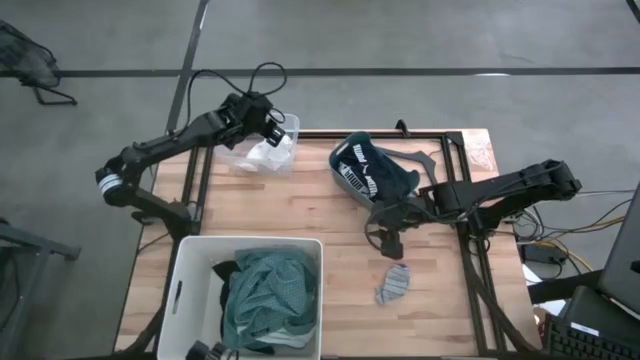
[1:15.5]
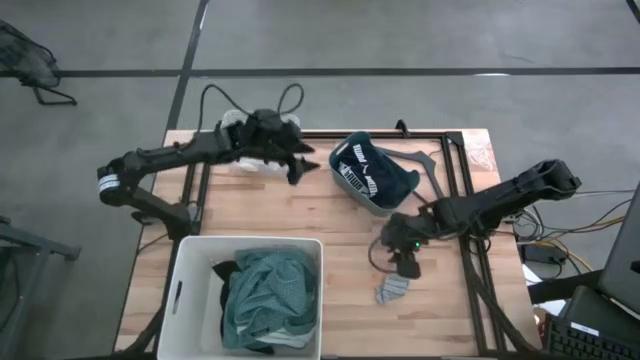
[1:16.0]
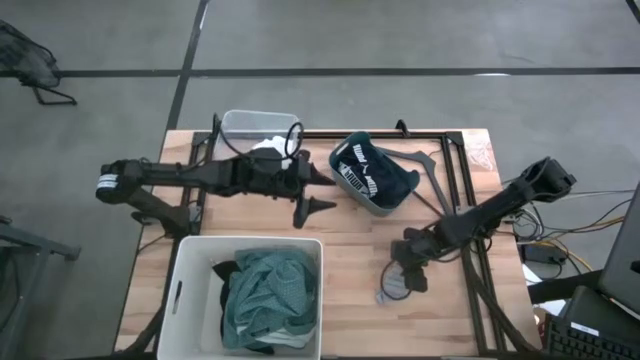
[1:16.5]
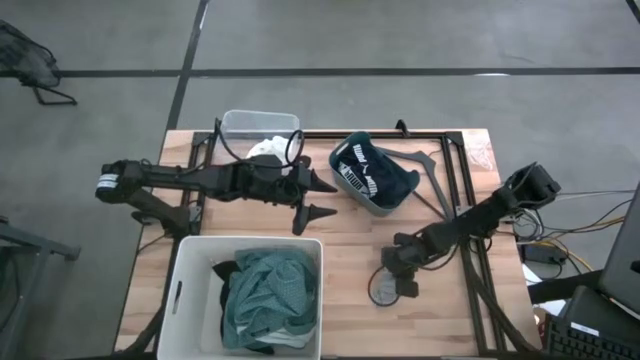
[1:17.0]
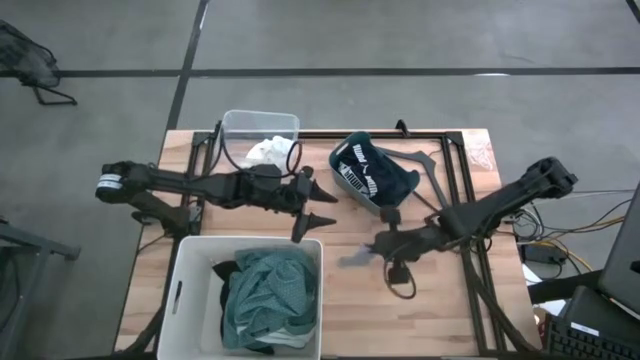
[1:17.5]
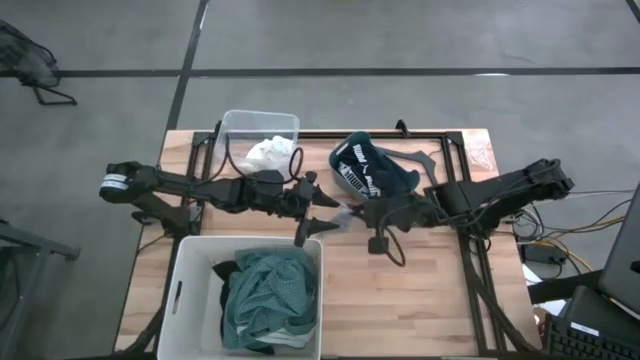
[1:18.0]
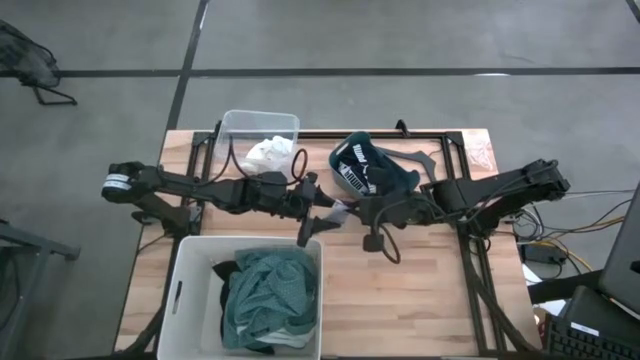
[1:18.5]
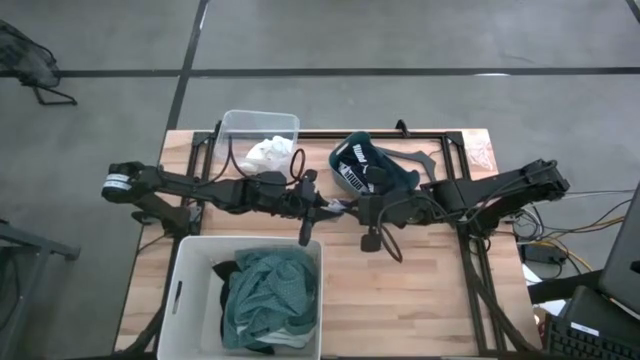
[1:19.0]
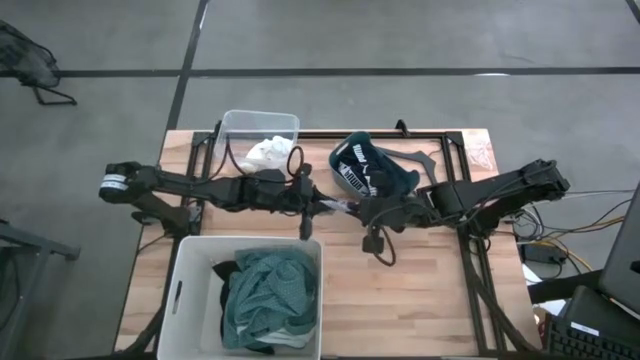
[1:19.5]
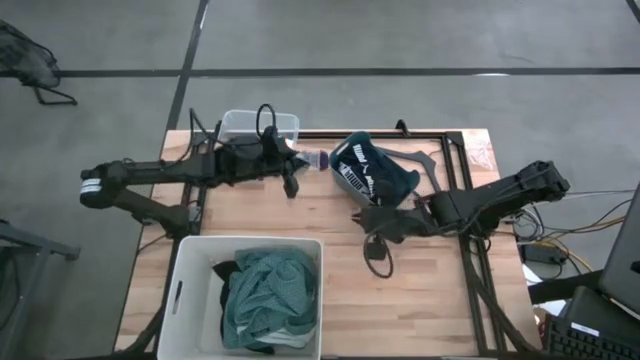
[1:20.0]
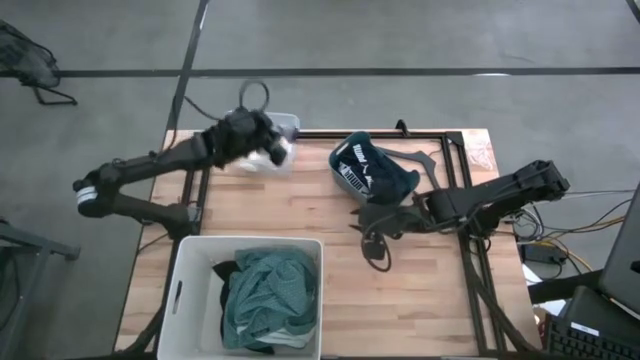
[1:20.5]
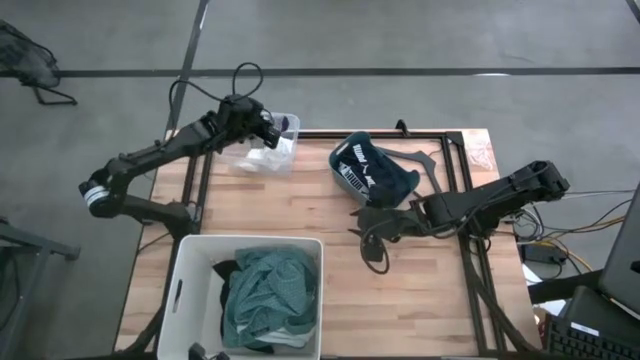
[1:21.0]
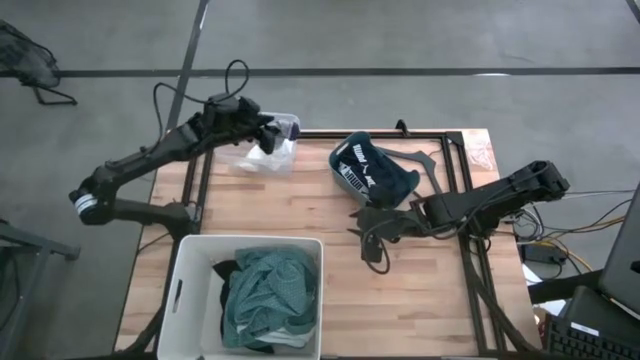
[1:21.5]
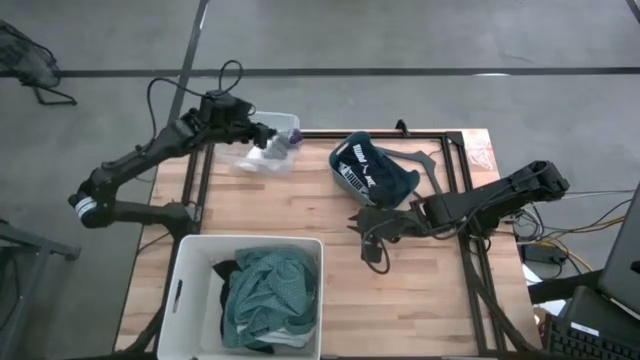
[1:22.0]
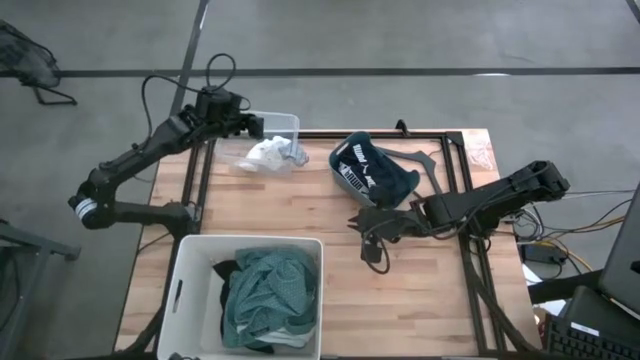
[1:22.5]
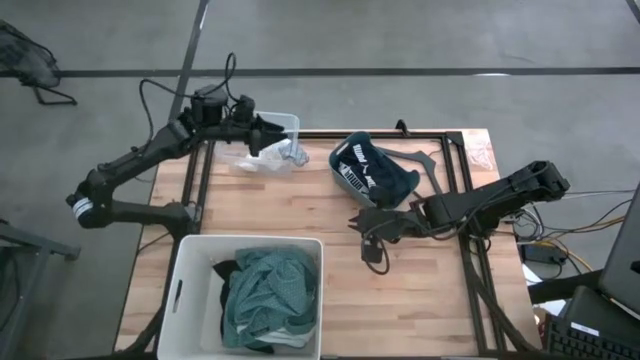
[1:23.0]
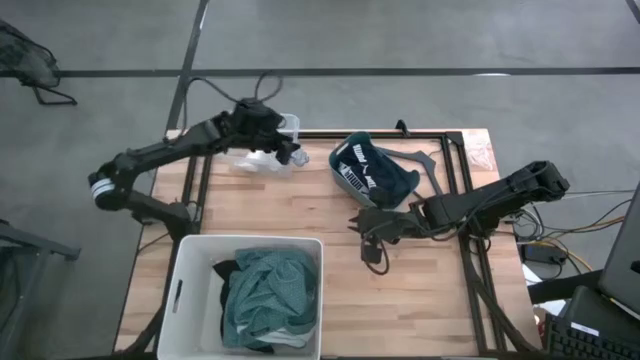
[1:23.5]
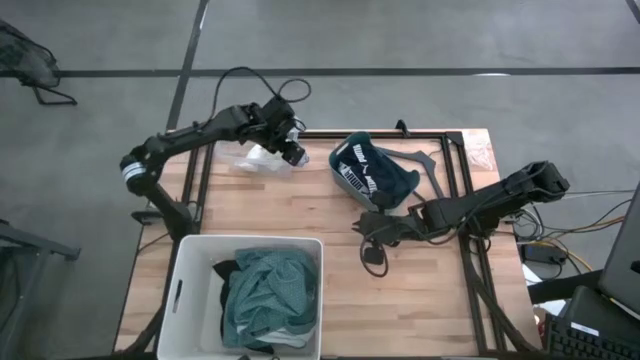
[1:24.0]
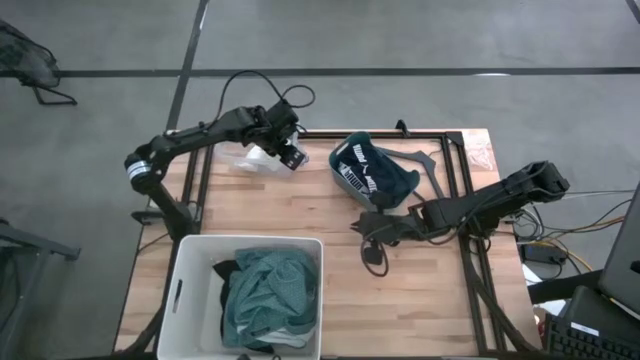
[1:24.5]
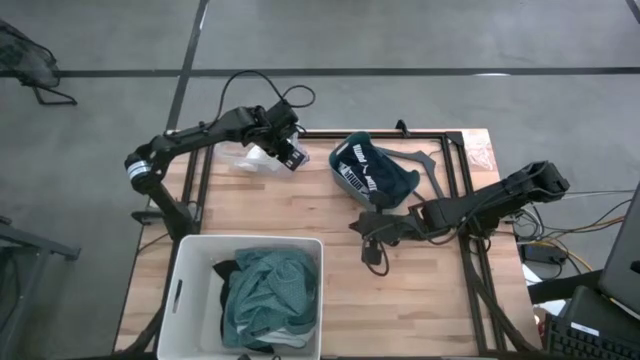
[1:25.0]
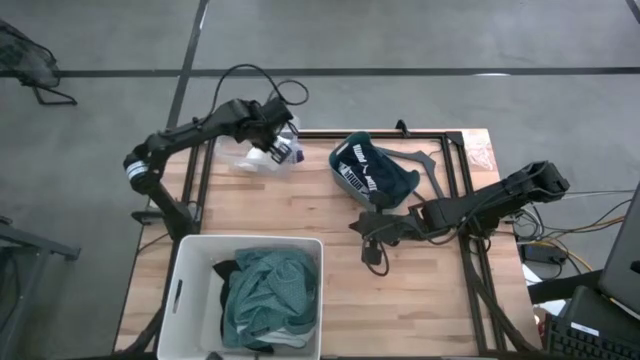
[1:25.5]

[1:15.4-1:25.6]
Task: Pick & Place Cloths
Put the gray sock into the transparent bin

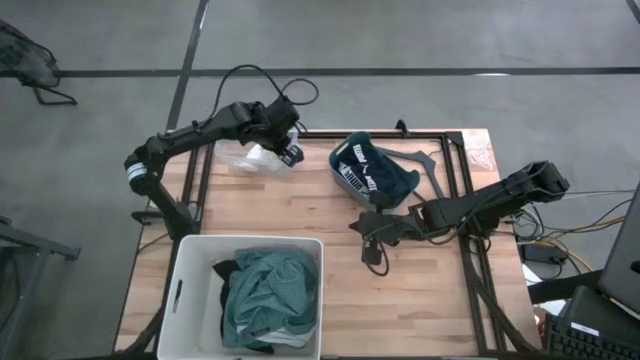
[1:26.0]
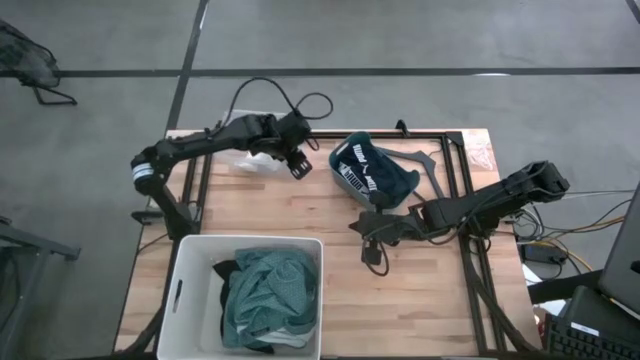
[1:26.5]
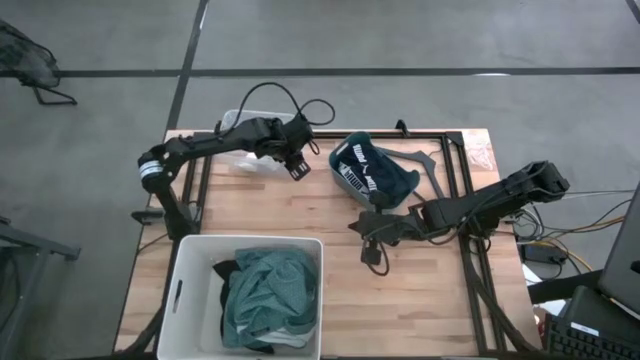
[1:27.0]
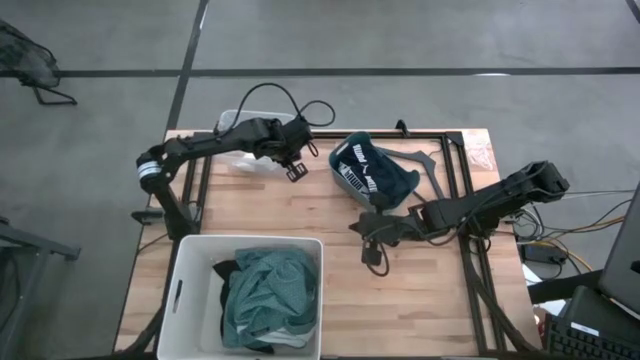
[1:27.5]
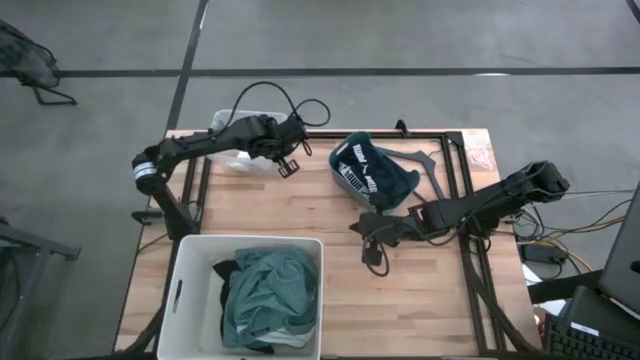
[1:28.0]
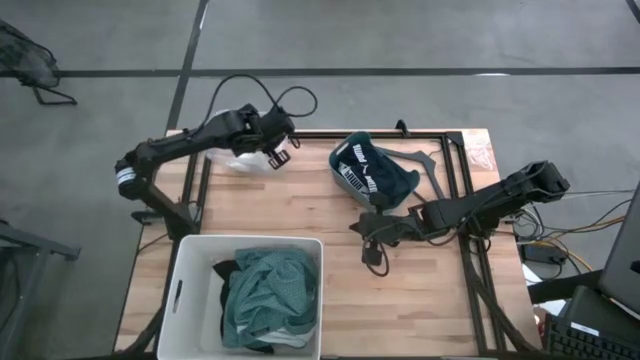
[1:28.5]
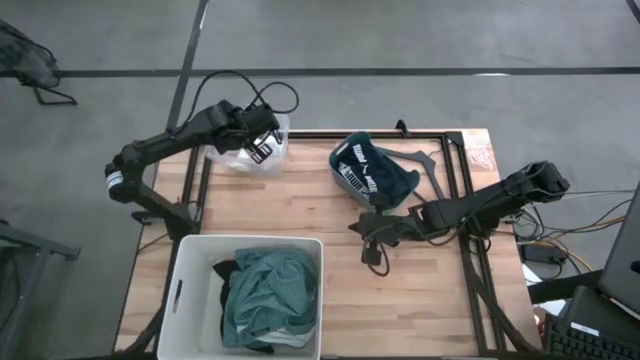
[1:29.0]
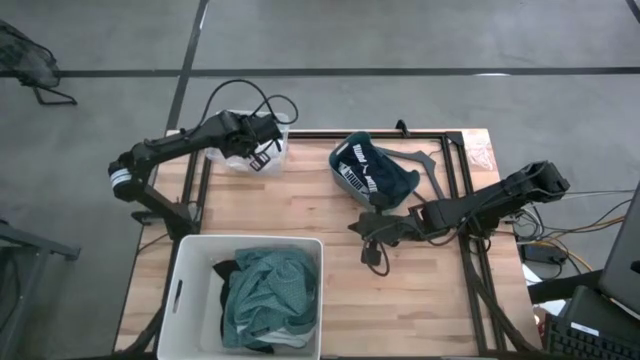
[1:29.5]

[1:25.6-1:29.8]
Put the gray sock into the transparent bin

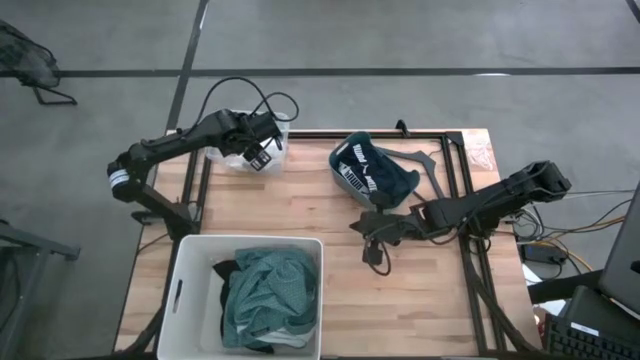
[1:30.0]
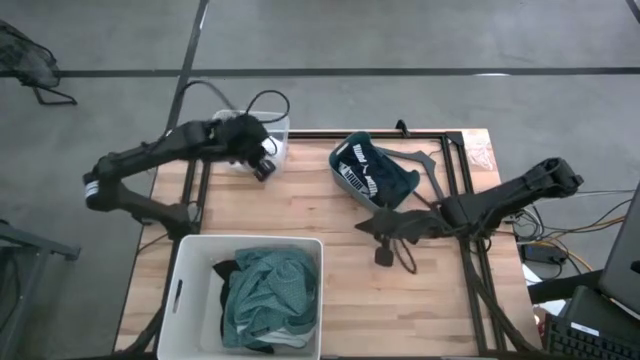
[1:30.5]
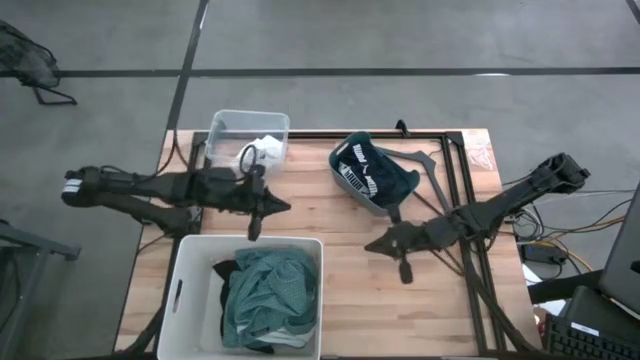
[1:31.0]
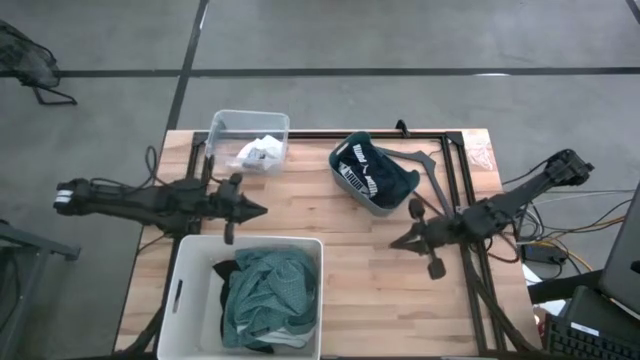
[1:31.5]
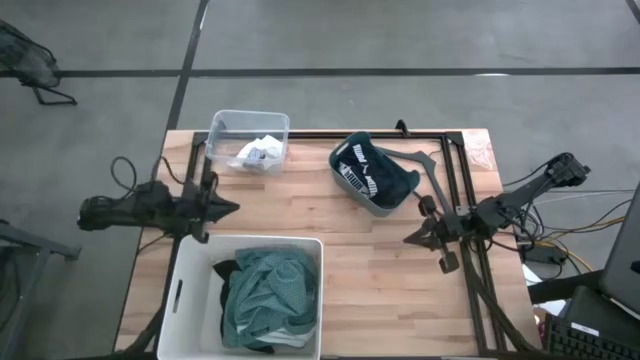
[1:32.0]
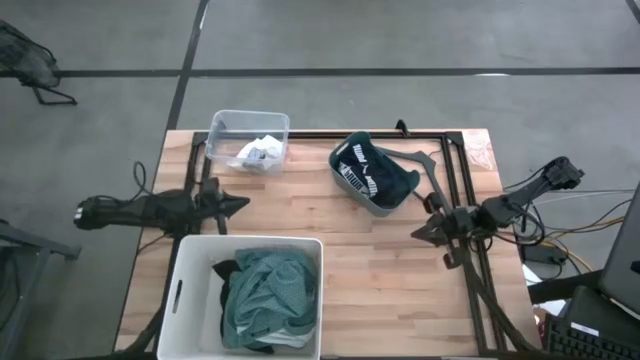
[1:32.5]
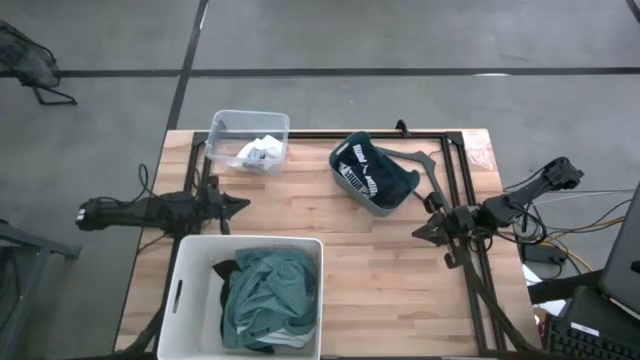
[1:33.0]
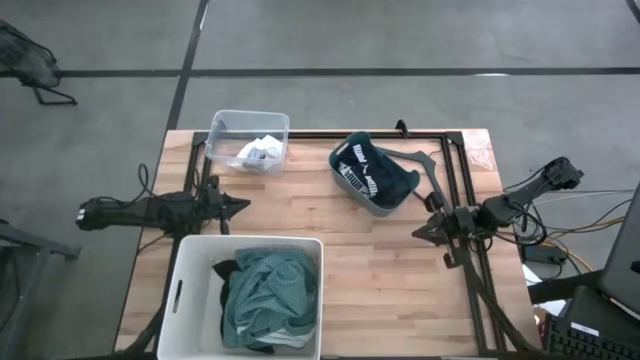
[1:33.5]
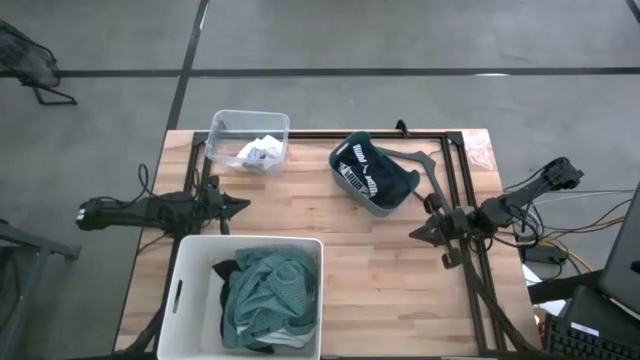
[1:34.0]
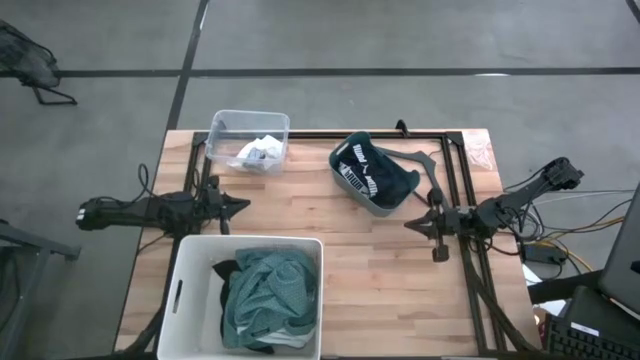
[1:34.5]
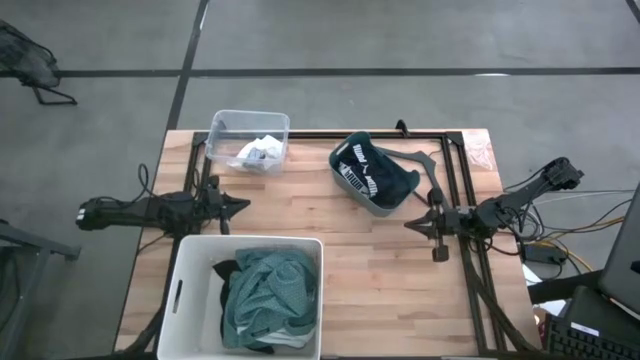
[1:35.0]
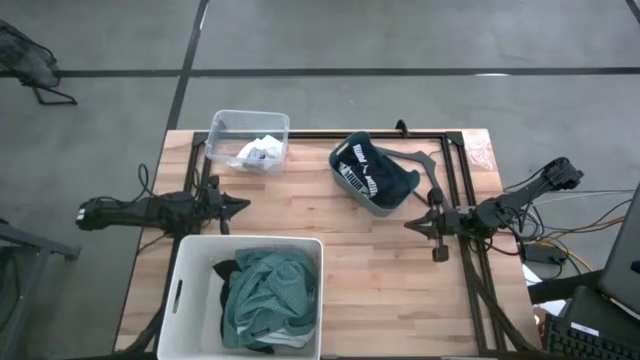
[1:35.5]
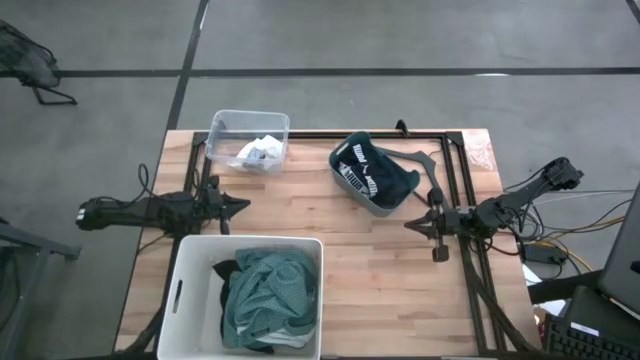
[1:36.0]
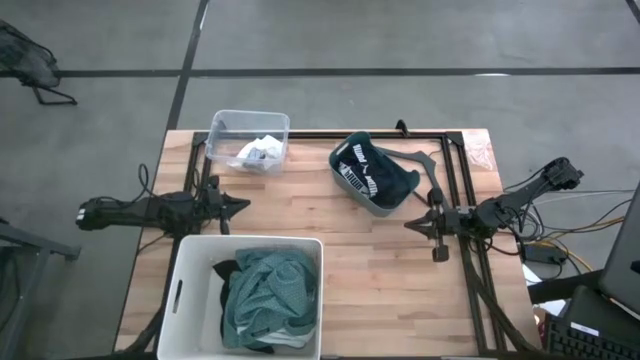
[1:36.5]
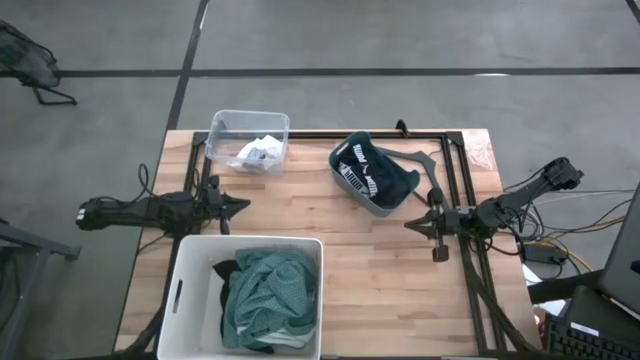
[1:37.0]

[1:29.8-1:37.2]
Return to Home Position
